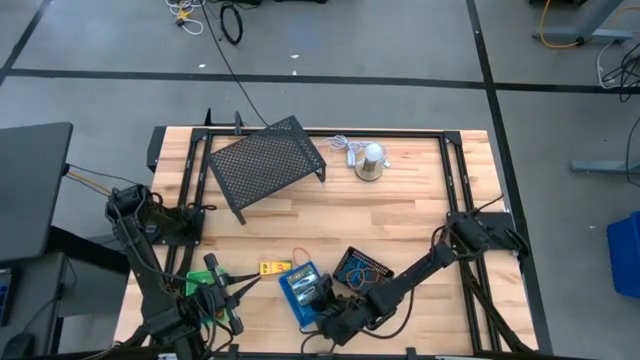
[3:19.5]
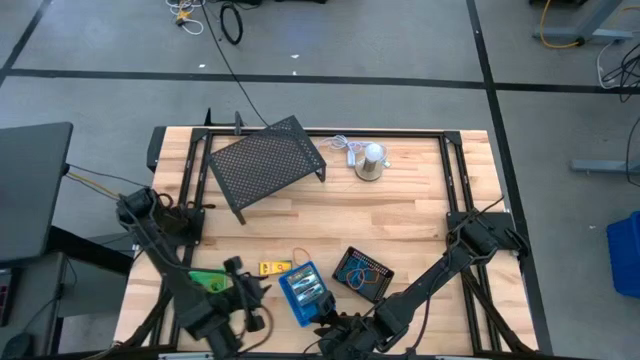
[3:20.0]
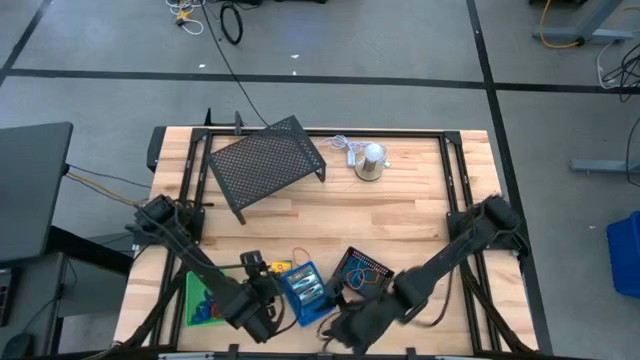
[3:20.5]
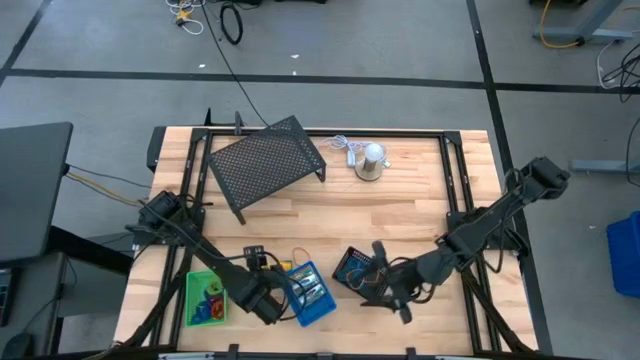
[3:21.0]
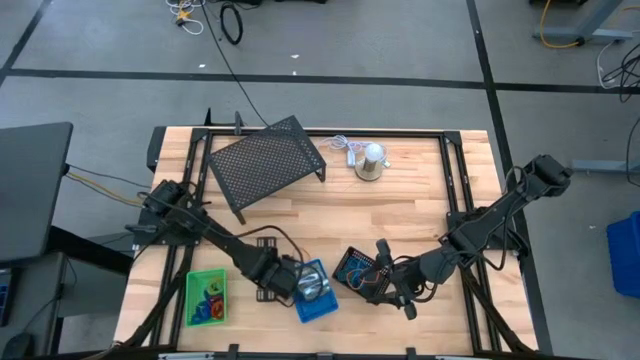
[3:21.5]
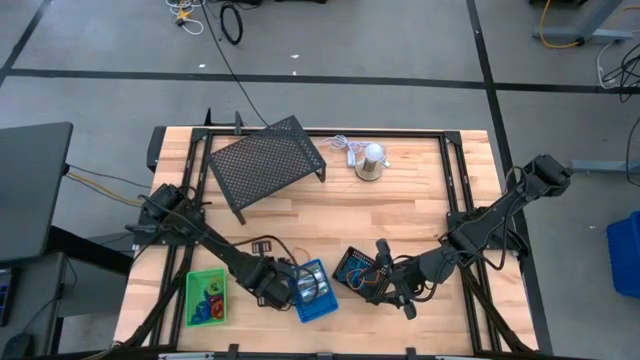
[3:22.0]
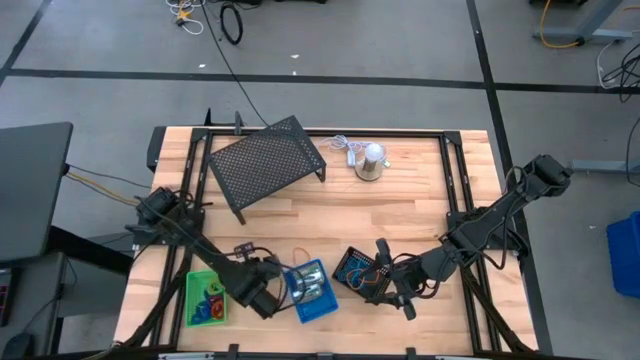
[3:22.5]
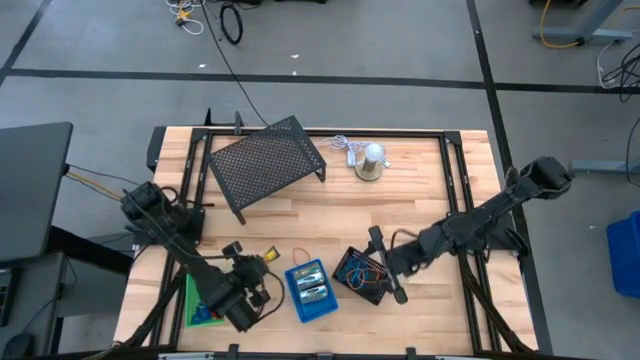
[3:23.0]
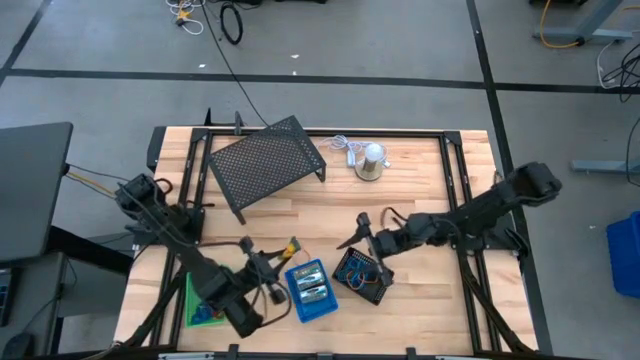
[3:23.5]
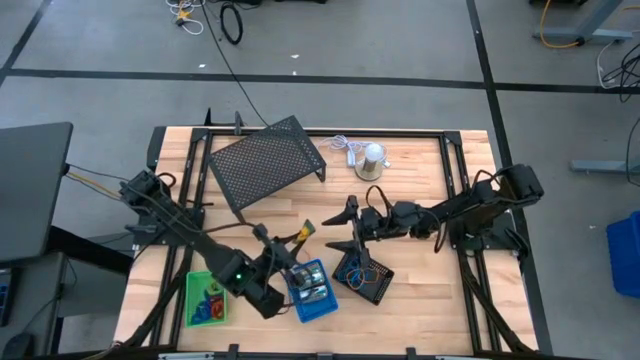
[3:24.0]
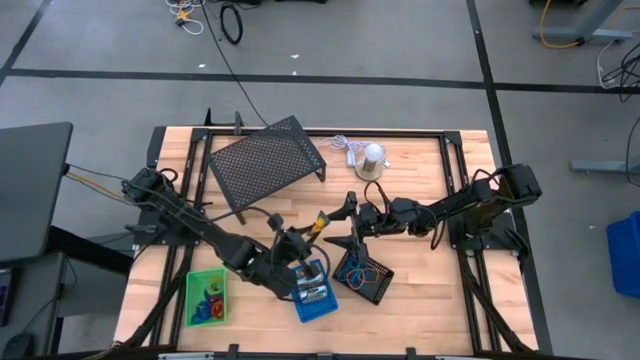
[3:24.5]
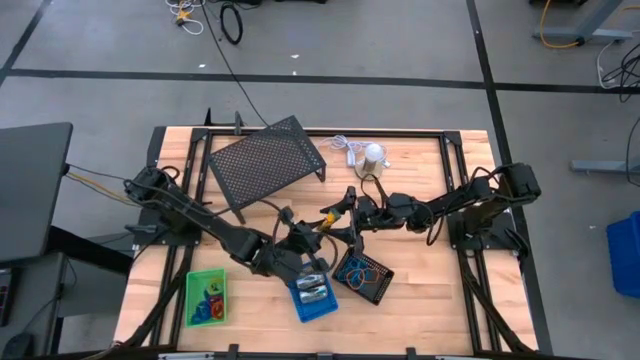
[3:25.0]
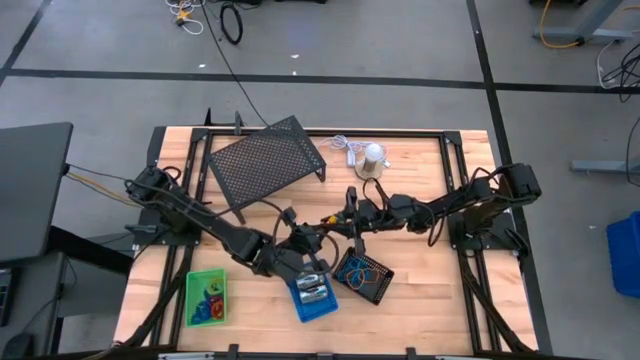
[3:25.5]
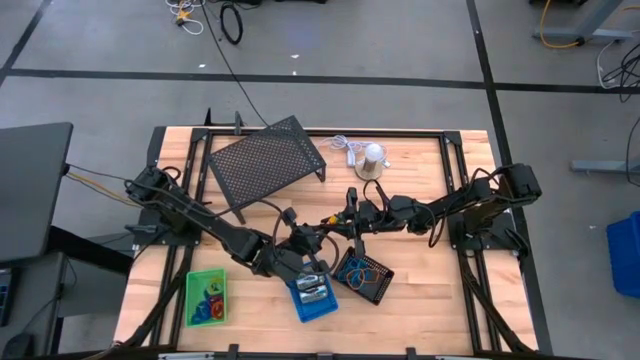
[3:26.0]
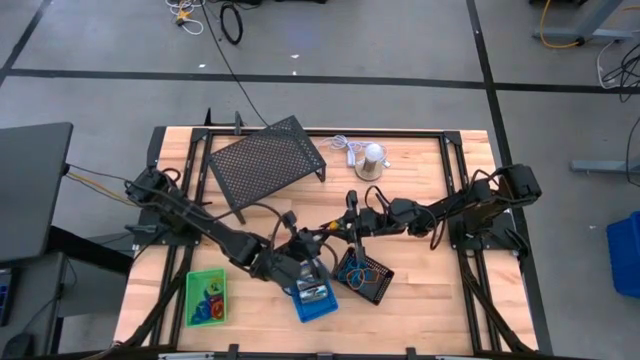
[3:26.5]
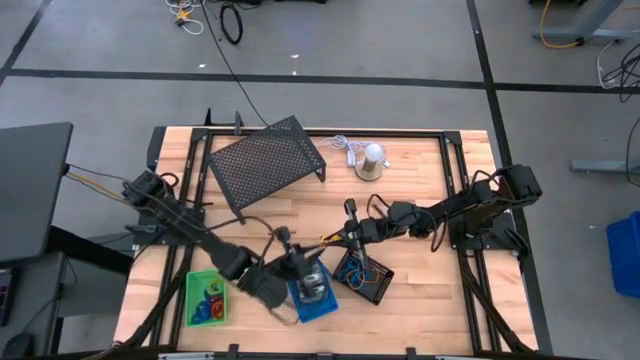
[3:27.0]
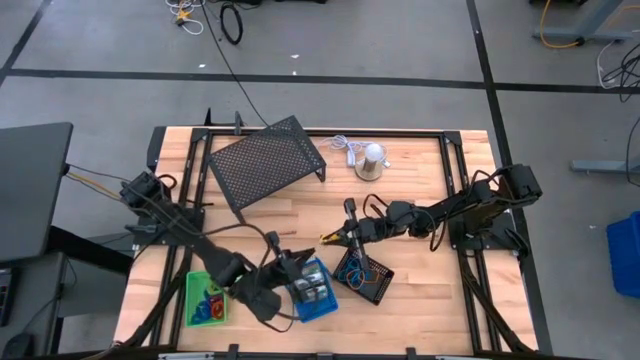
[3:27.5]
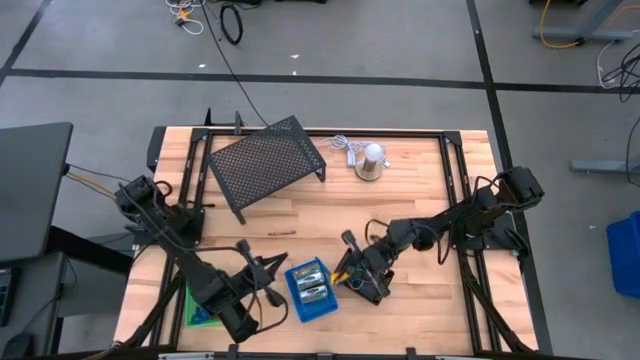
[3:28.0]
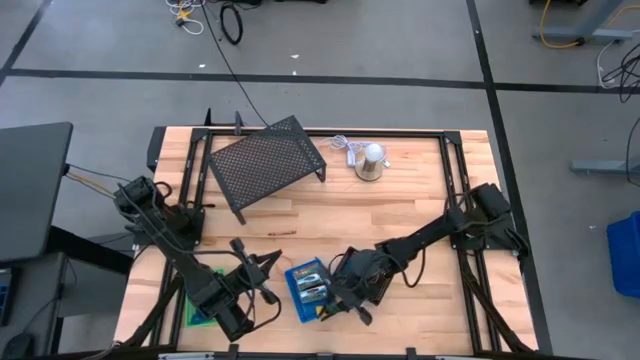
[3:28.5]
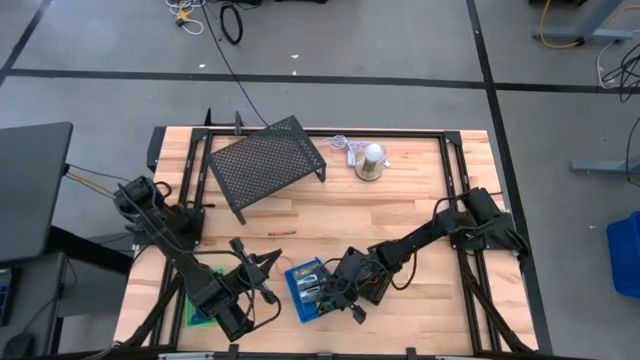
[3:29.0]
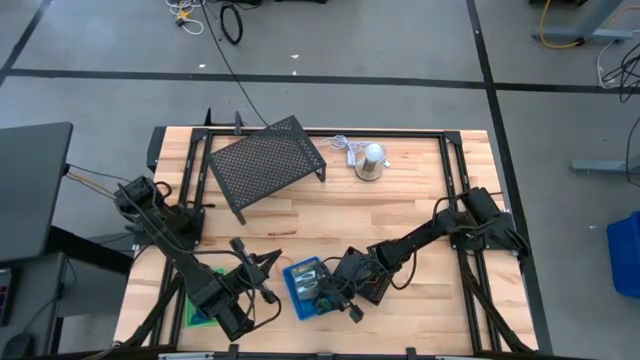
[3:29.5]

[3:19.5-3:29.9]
Task: Pick & Place Office Desk Supplies
Put the yellow crayon box into the blue bin

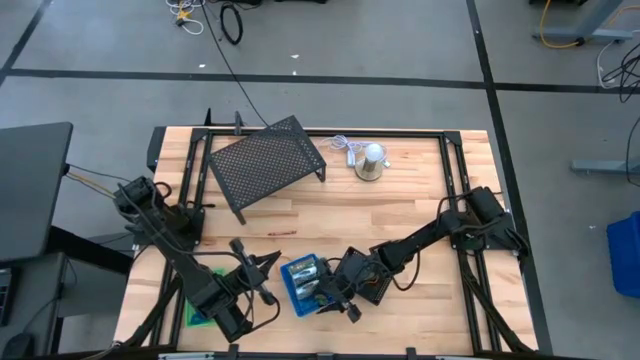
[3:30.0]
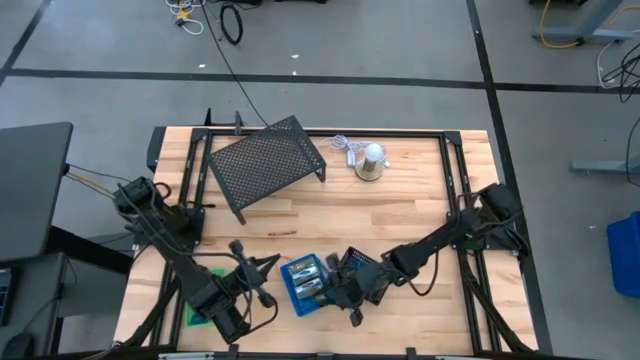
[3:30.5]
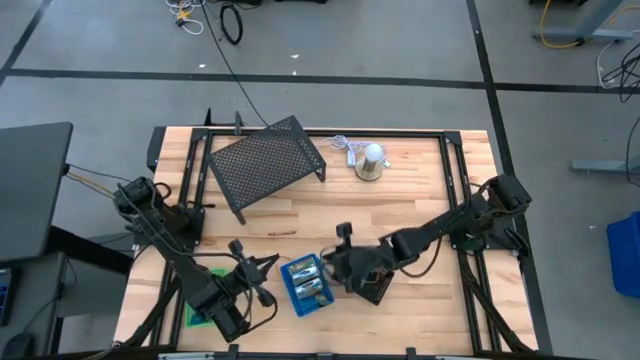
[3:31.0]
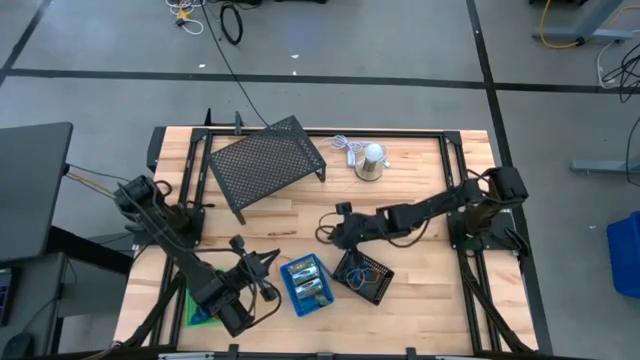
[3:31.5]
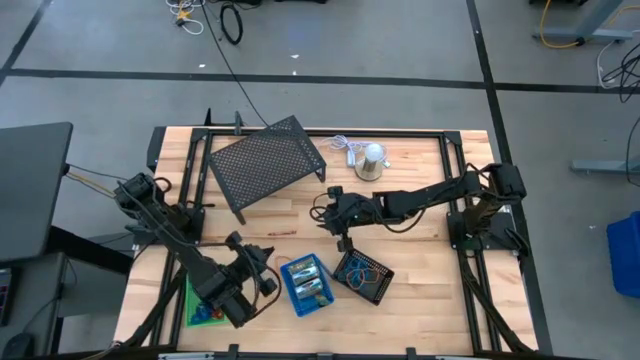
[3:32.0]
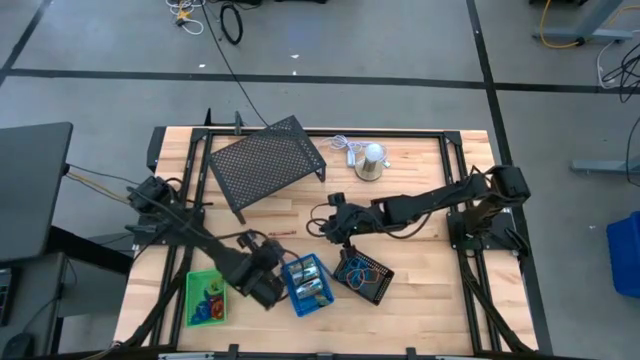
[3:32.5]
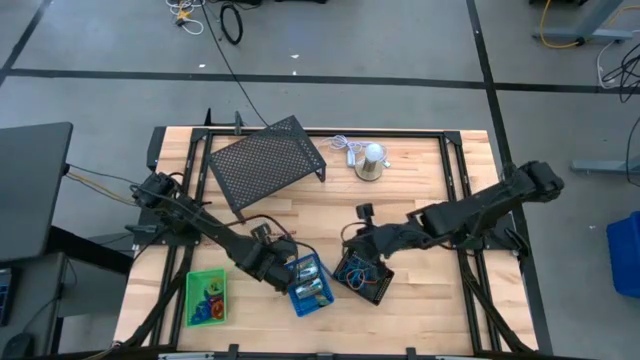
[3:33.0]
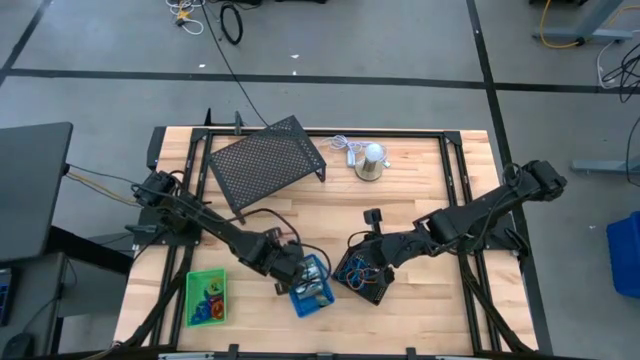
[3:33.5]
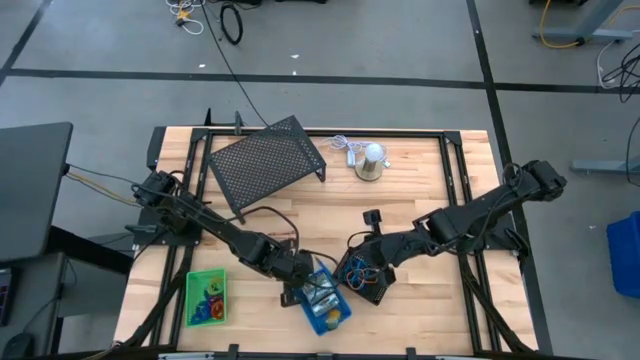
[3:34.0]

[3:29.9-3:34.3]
Adjust the blue bin

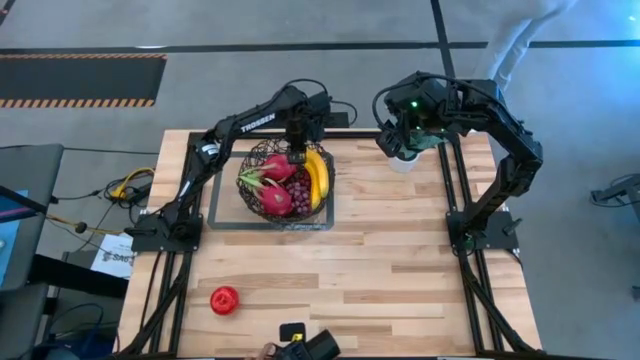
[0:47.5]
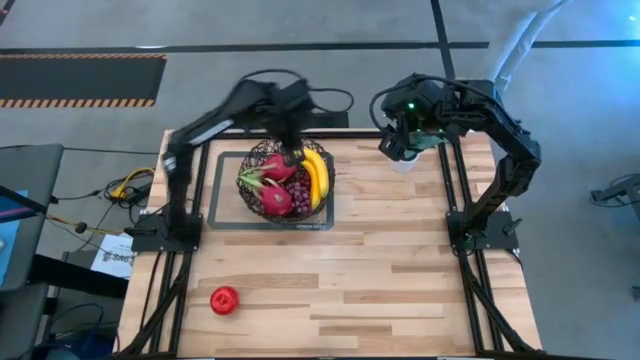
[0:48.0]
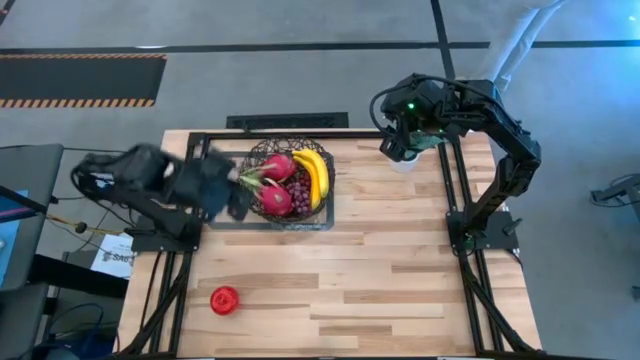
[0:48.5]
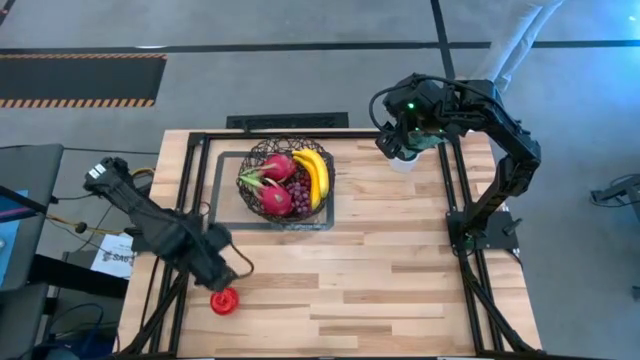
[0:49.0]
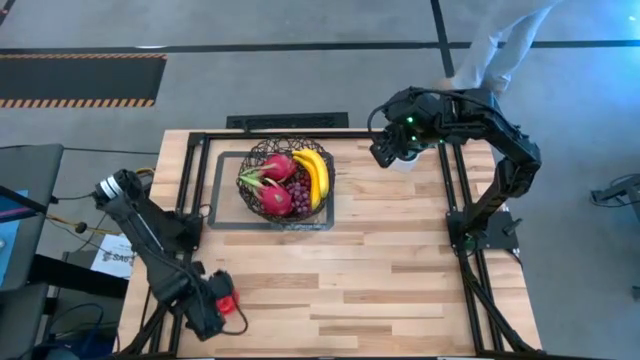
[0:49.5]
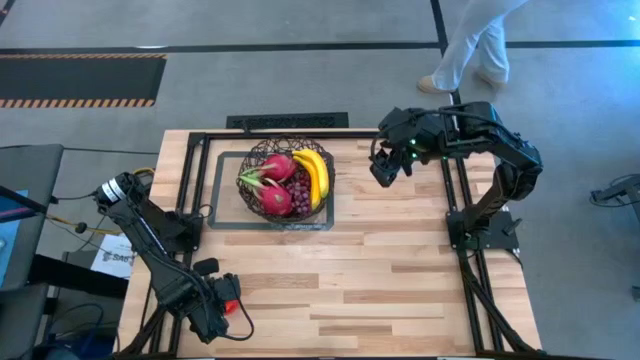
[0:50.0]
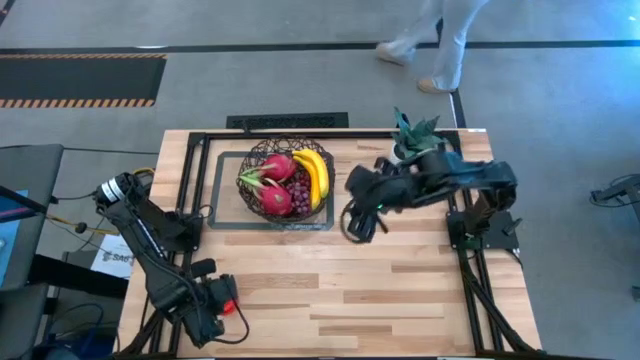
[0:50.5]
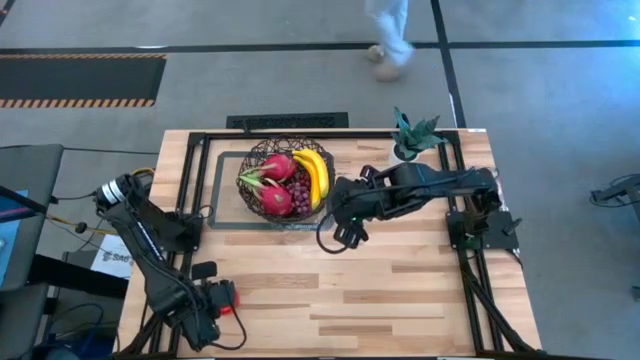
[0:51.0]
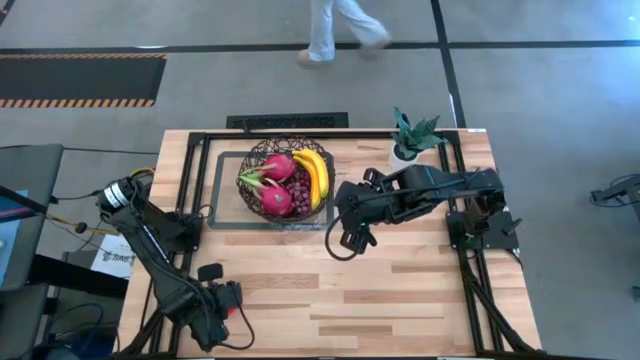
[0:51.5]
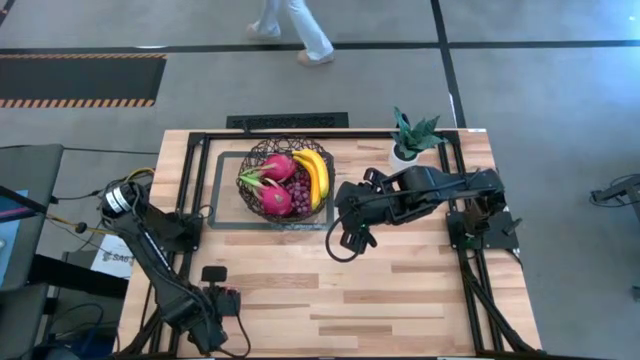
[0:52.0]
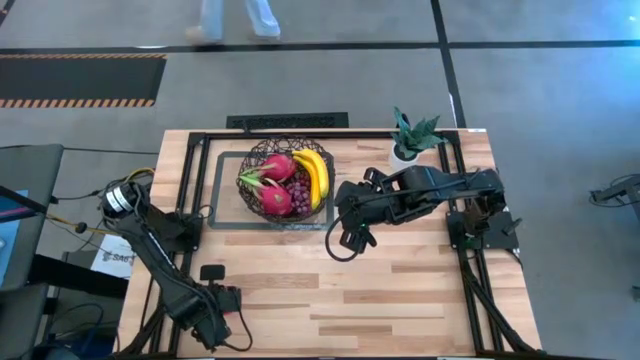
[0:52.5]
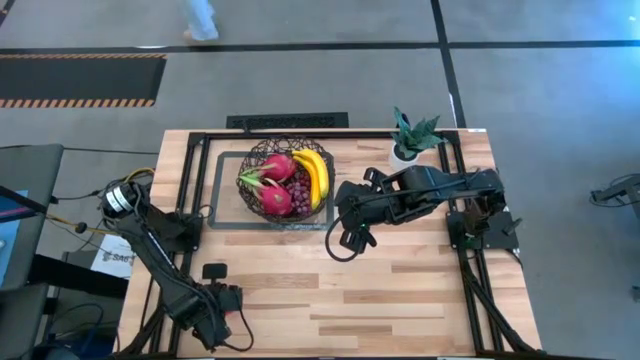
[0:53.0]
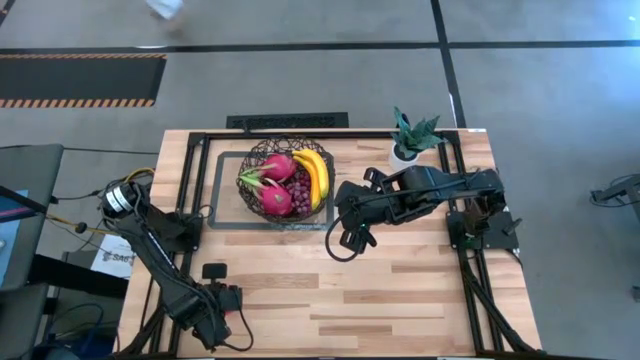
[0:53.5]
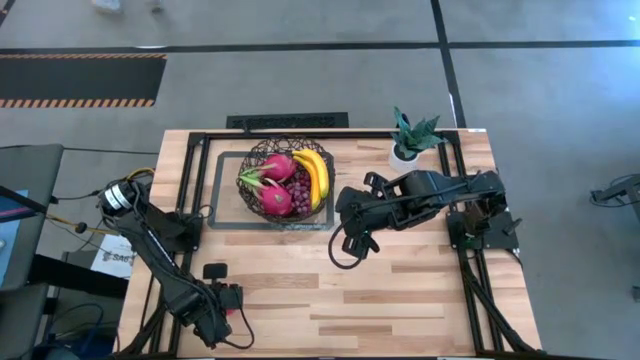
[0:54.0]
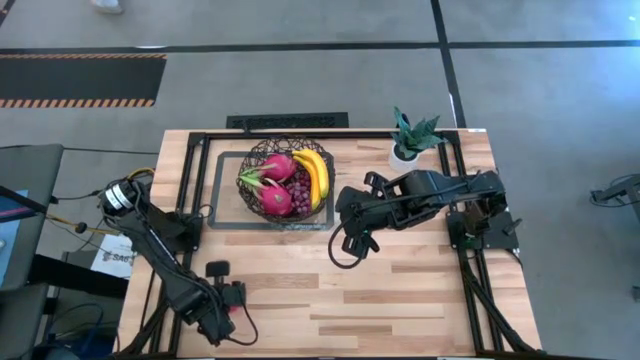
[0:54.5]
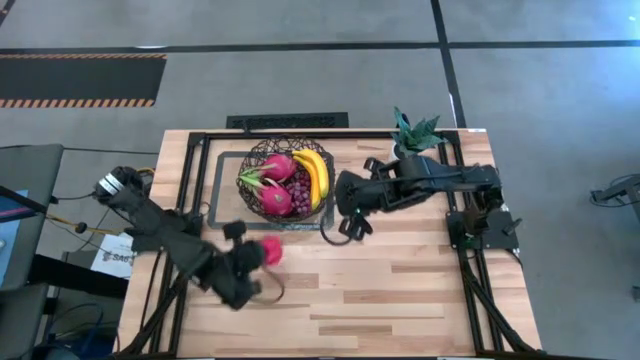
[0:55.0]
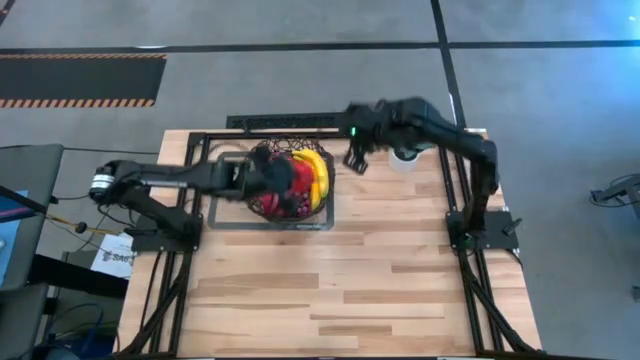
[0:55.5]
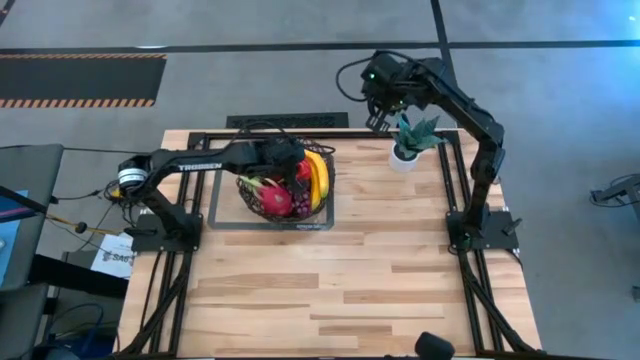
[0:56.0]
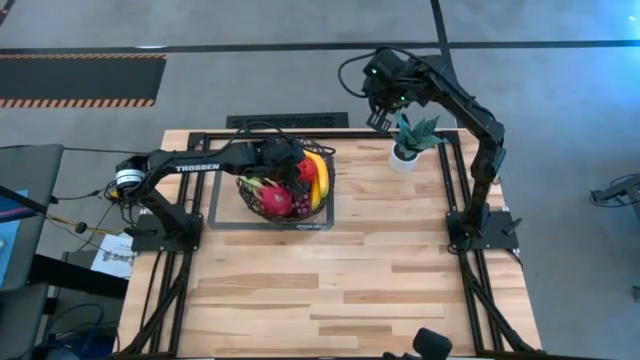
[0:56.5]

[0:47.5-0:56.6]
Task: Build produce basket
Put the red apple into the black wire basket
